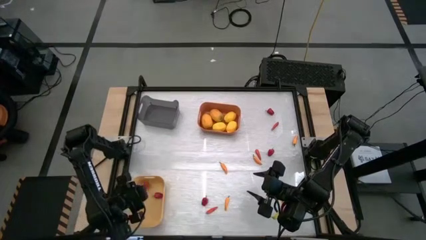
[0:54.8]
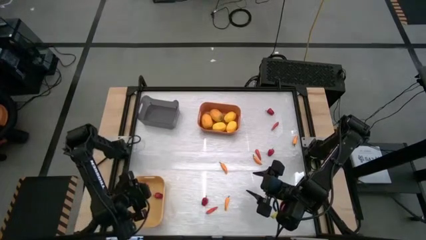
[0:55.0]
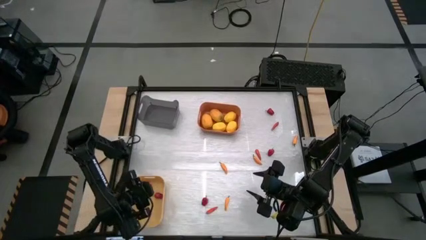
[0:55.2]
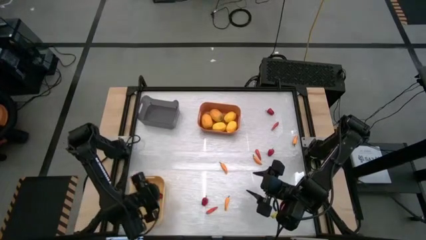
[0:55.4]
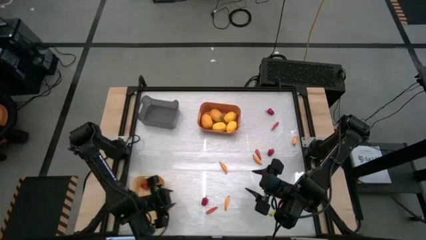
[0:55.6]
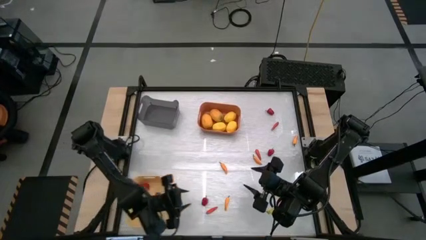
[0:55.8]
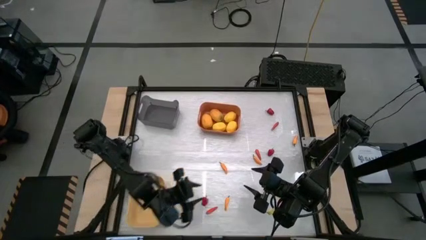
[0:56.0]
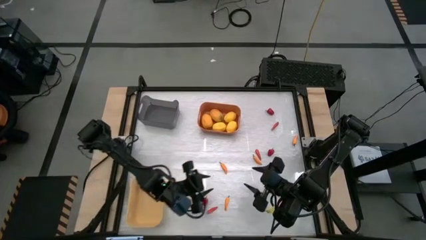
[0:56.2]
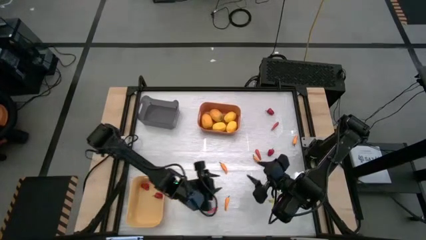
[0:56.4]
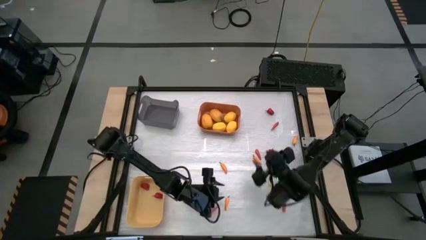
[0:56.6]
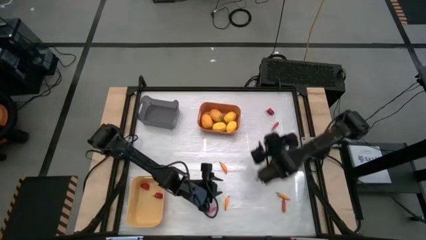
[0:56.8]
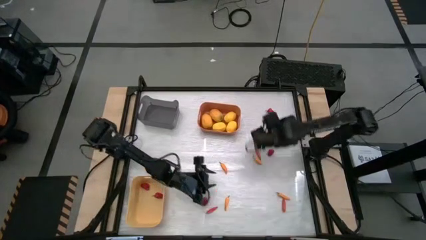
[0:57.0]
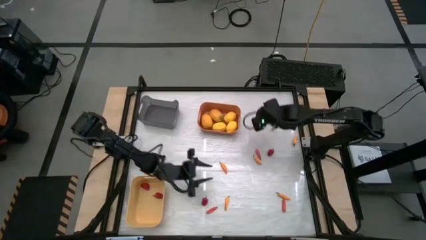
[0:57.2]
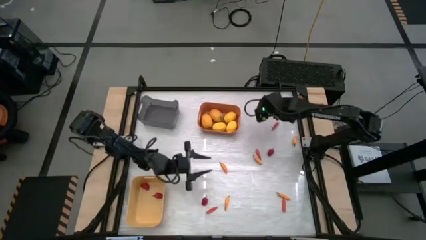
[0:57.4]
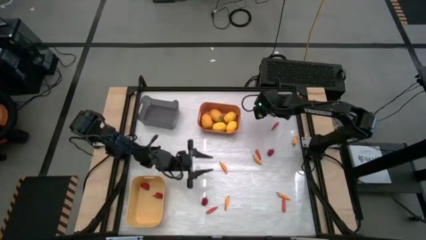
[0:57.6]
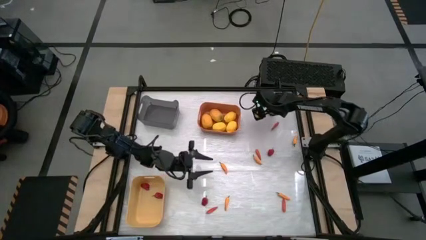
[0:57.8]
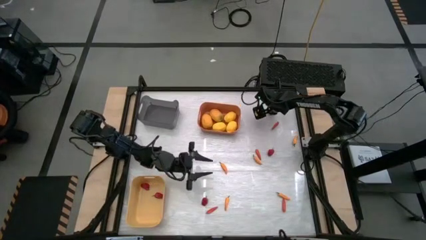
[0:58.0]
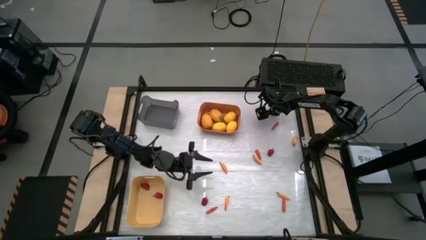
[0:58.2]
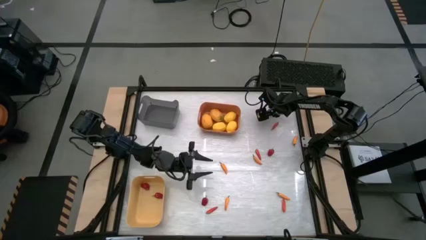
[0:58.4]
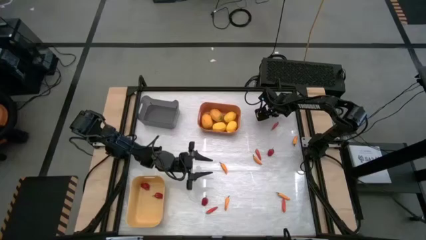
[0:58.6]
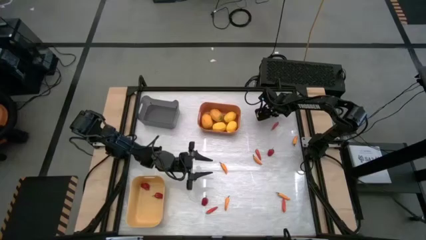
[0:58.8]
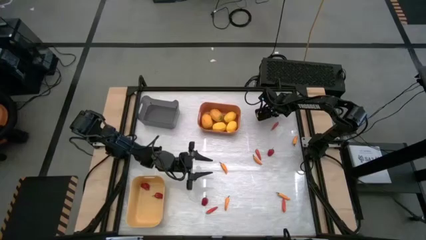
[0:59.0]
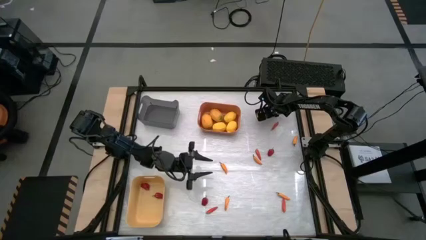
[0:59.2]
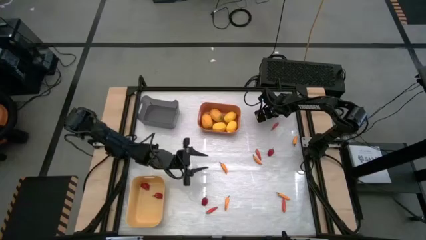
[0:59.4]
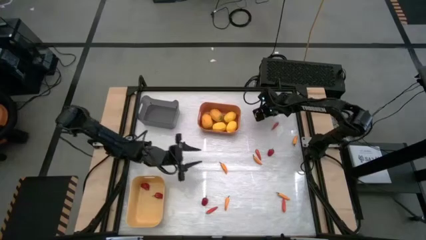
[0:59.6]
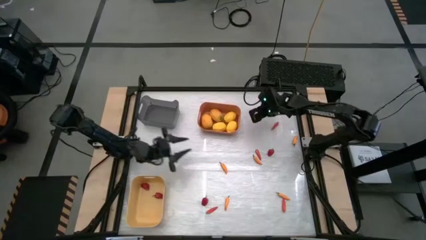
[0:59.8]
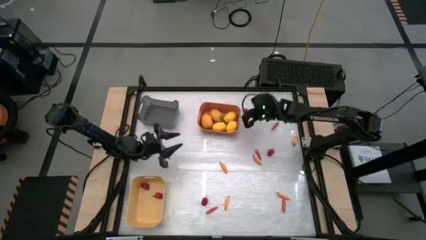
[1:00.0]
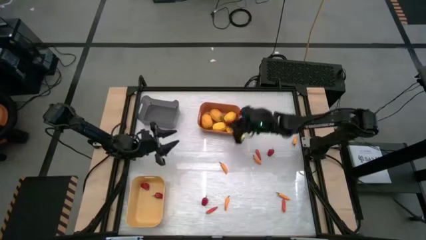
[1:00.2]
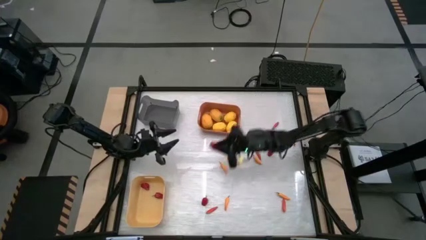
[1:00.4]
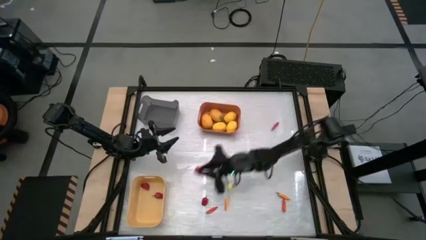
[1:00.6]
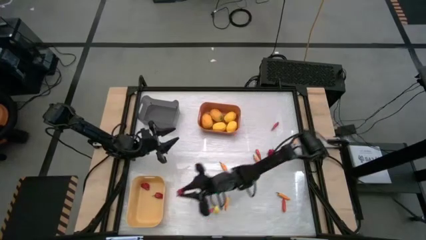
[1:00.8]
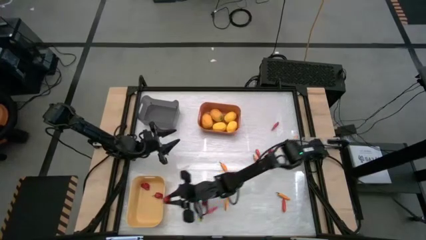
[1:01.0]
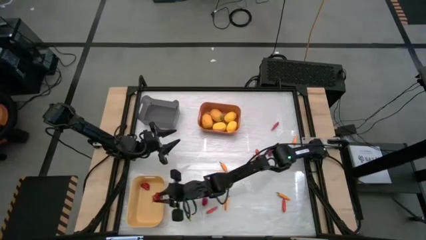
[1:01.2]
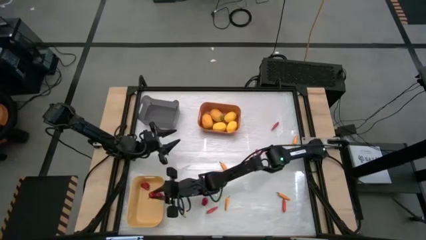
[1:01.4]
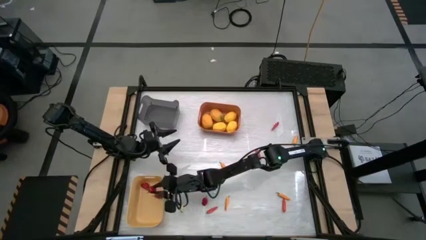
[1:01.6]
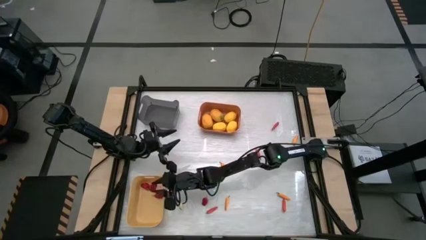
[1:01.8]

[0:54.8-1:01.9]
Task: Sort produce into baskets
Put the red chili pepper into the yellow bin

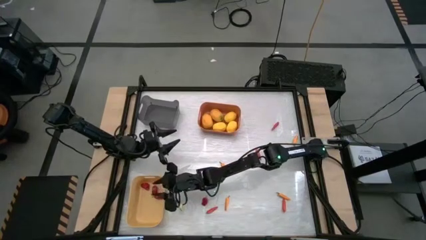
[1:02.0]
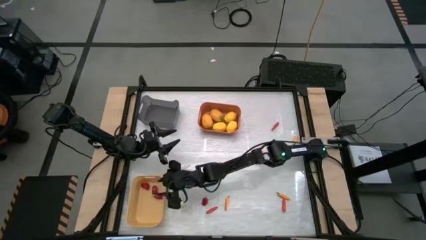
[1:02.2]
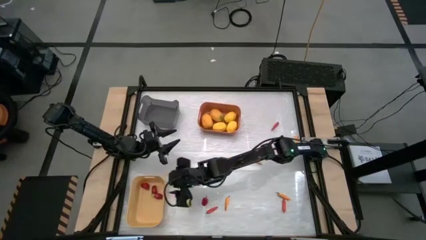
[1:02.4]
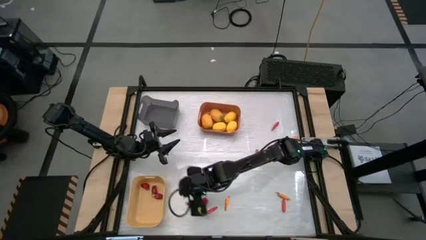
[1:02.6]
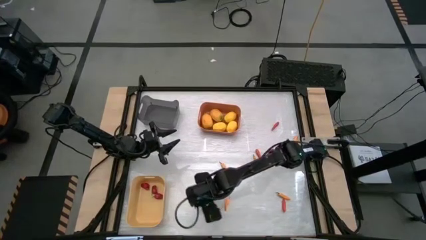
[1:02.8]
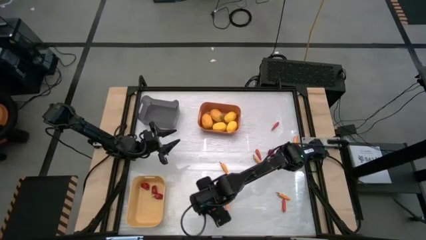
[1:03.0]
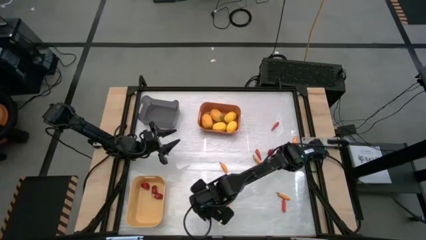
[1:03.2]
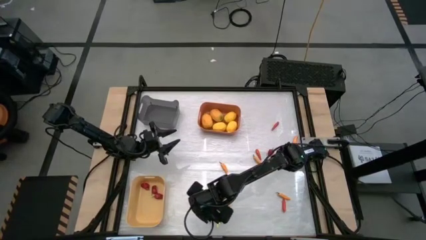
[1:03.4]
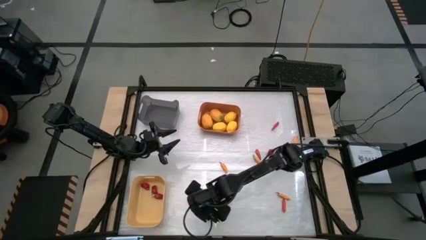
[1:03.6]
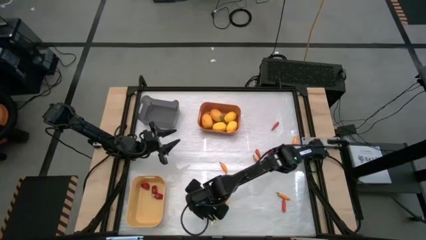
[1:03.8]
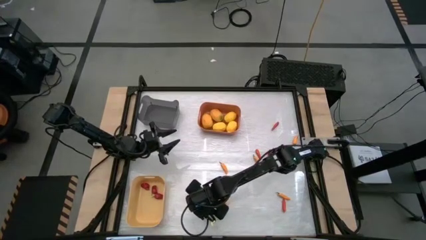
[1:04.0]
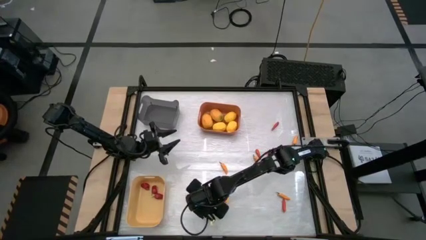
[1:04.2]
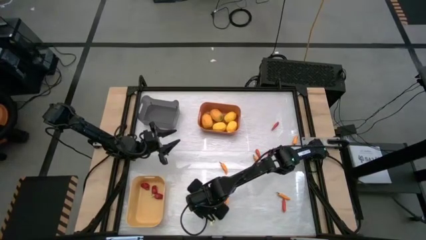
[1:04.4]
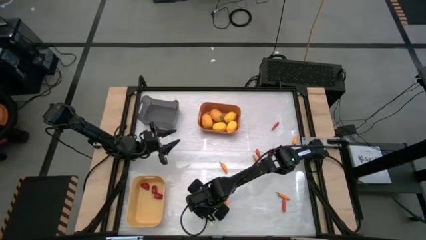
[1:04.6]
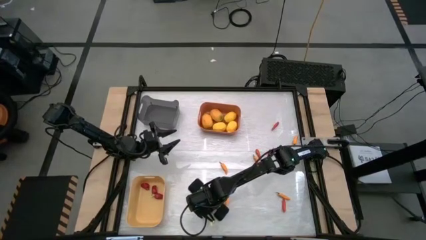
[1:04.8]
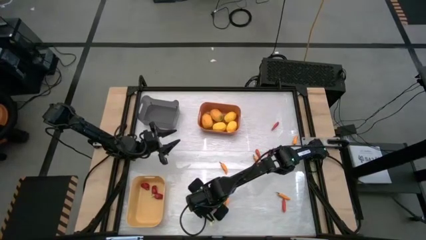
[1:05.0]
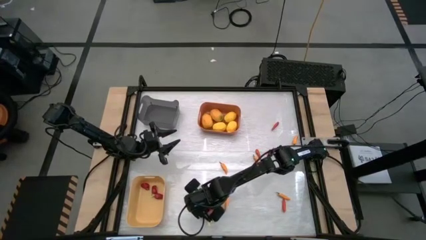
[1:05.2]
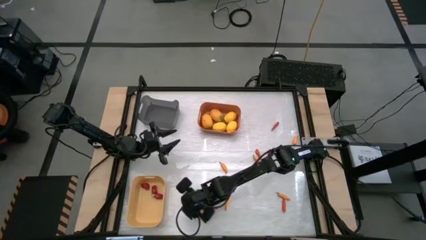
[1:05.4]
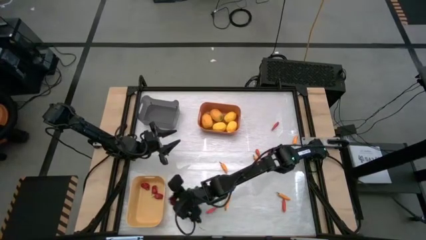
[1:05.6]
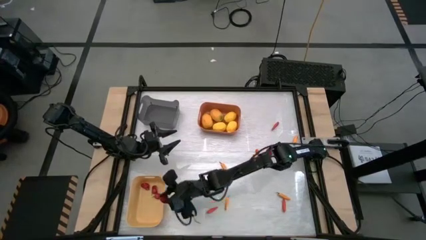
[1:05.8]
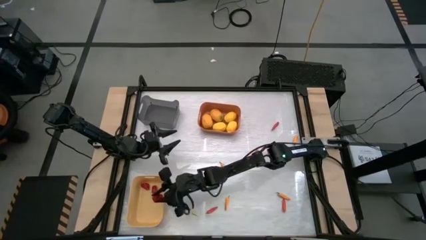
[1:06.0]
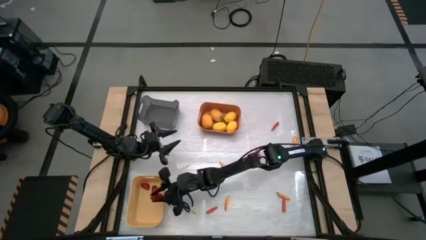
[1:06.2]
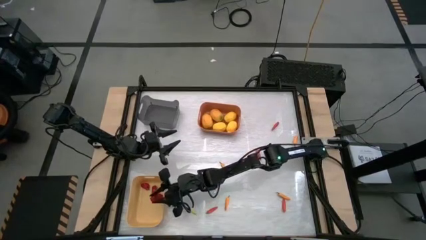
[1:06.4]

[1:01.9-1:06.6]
Put the red chili pepper into the yellow bin

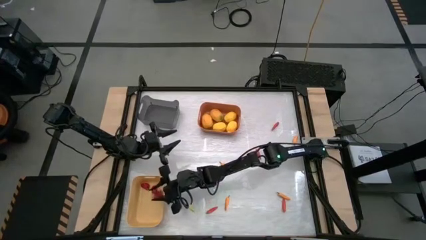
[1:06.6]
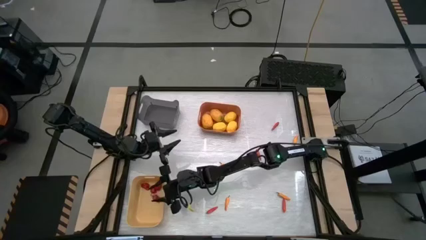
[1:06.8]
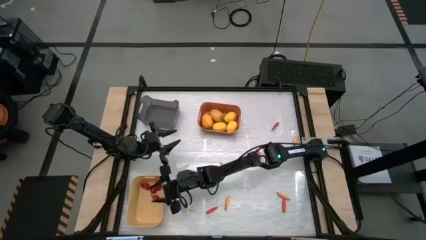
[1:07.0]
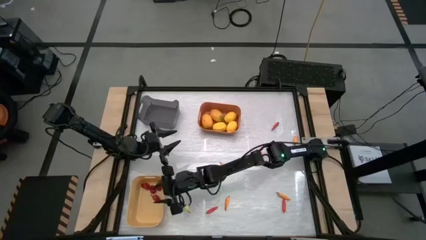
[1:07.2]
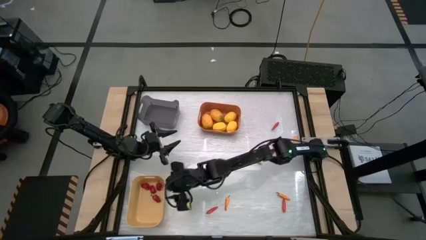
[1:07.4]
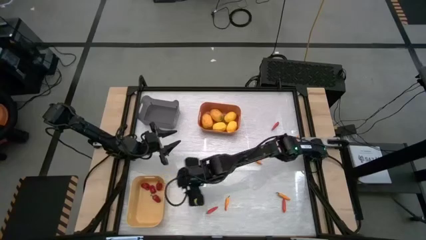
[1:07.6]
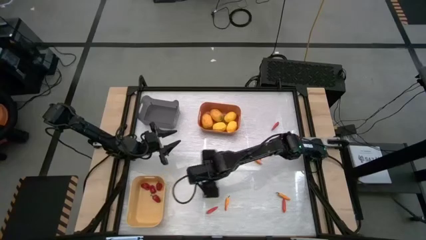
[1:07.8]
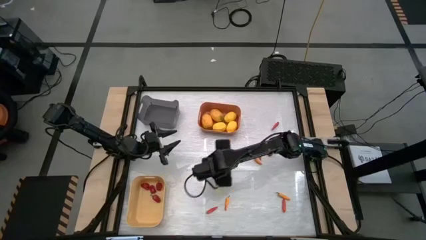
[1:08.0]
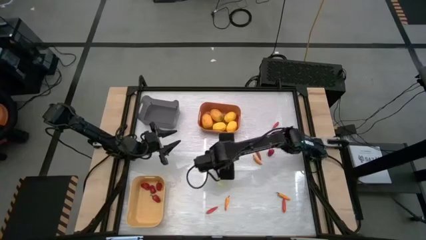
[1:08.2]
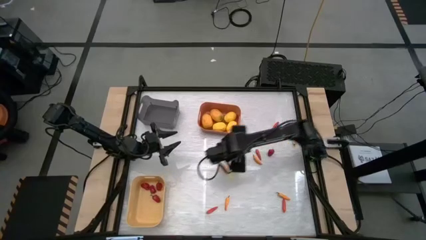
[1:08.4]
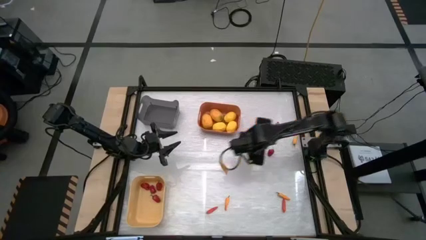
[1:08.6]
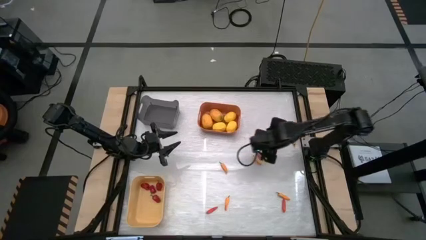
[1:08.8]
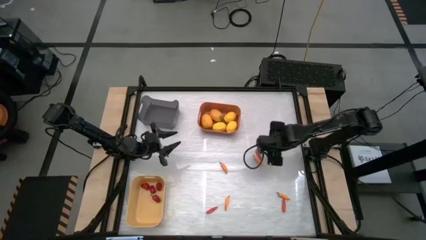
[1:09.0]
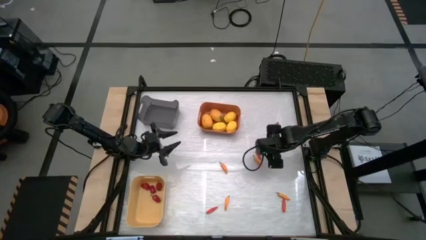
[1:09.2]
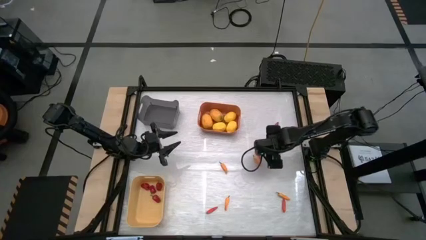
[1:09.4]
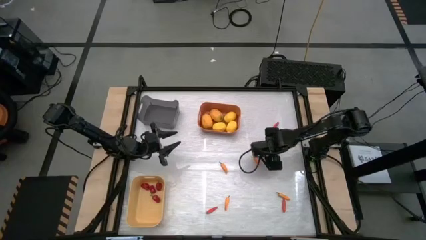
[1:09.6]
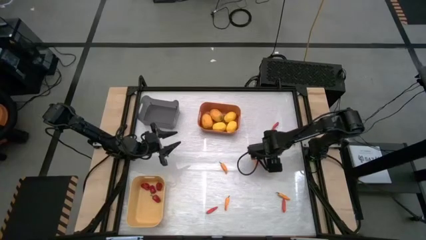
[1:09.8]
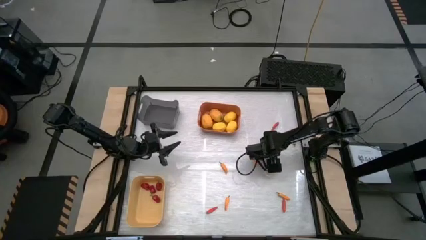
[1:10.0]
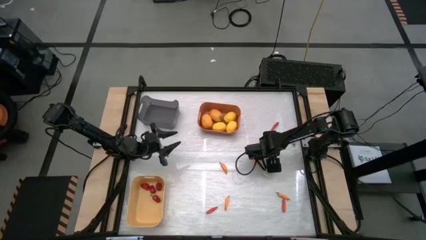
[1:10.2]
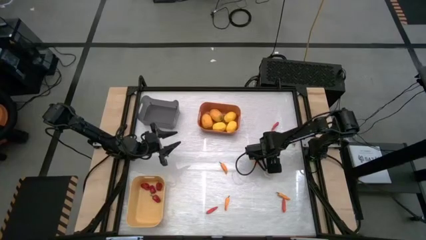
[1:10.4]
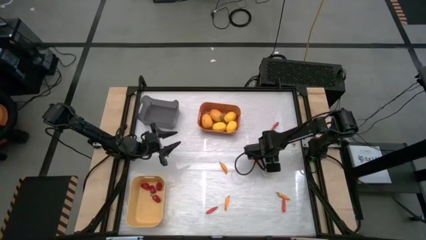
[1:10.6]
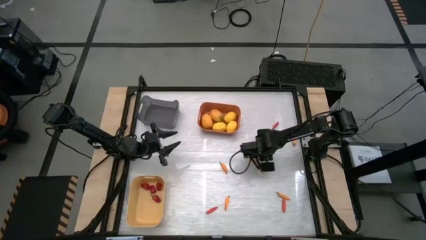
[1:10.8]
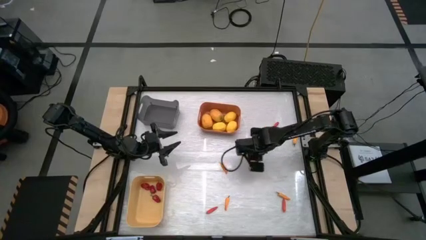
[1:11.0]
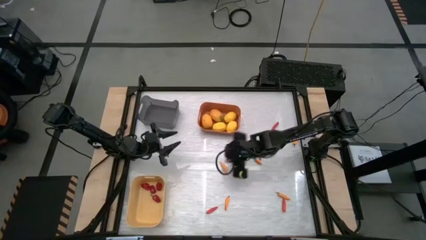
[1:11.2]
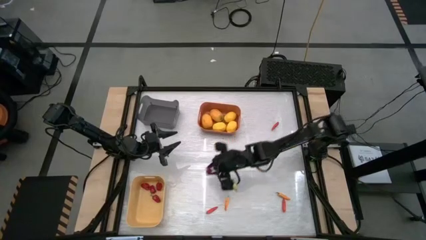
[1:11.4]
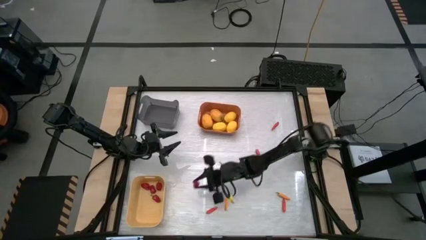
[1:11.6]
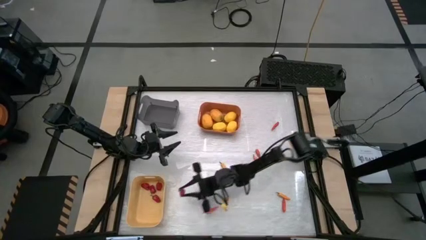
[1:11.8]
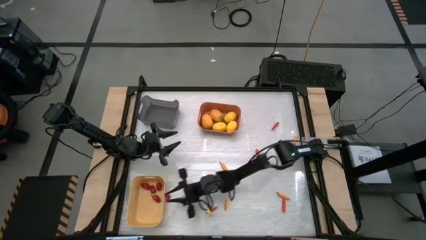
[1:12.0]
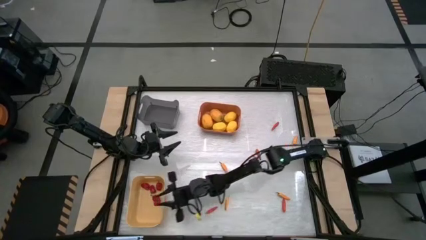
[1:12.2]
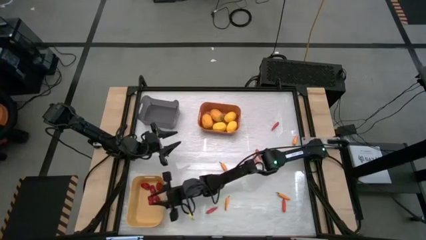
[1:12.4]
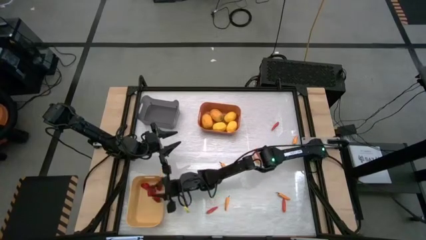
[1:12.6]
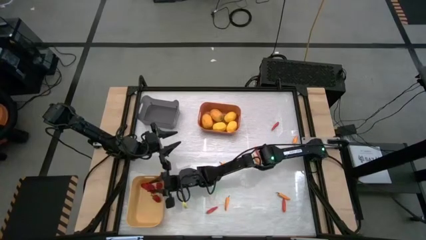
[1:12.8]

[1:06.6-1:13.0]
Put the red chili pepper into the yellow bin
